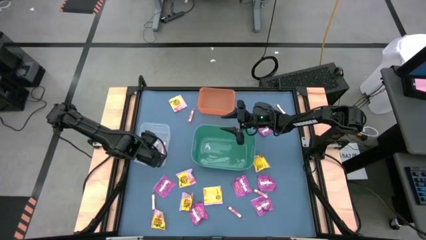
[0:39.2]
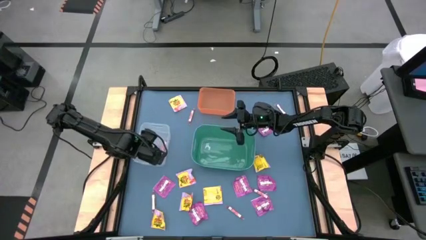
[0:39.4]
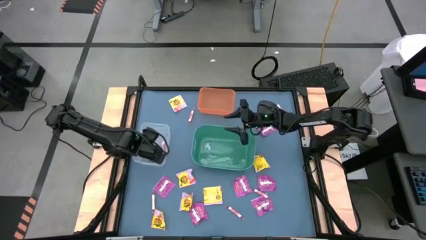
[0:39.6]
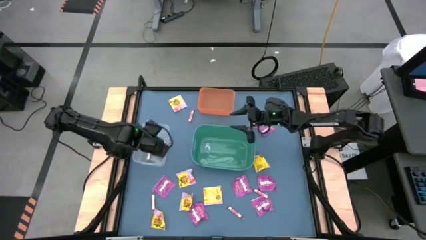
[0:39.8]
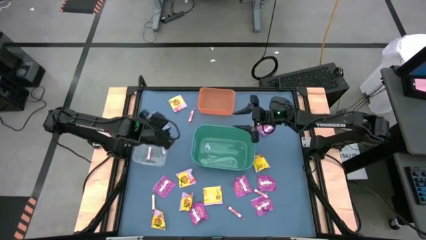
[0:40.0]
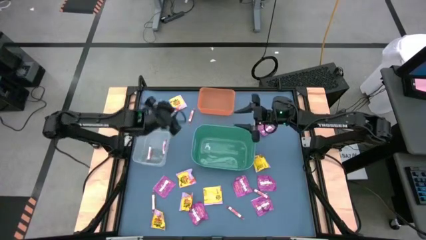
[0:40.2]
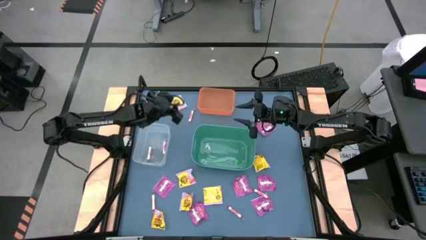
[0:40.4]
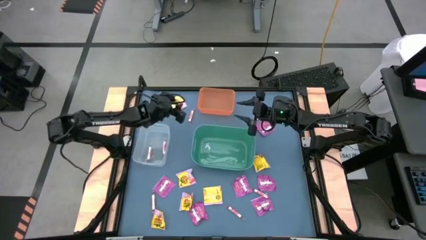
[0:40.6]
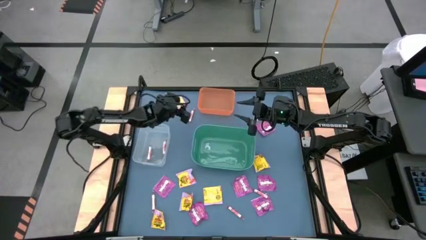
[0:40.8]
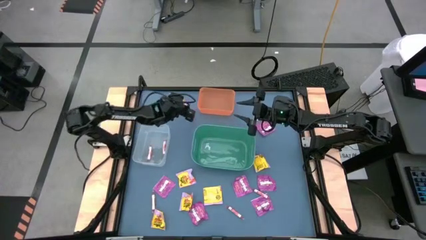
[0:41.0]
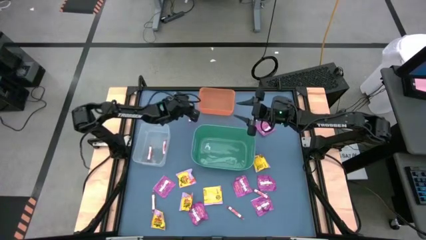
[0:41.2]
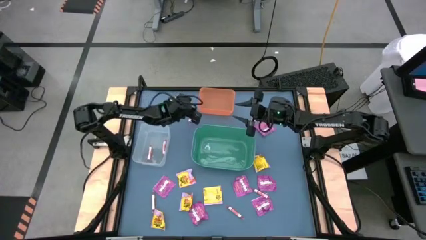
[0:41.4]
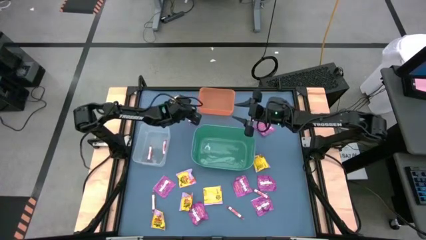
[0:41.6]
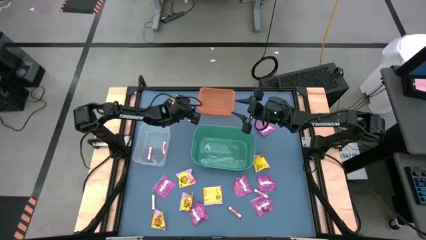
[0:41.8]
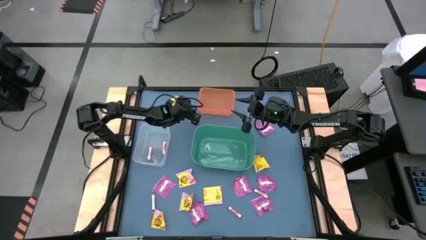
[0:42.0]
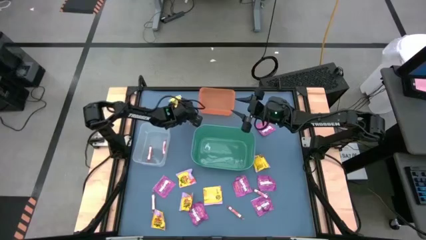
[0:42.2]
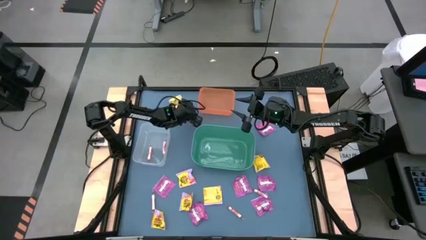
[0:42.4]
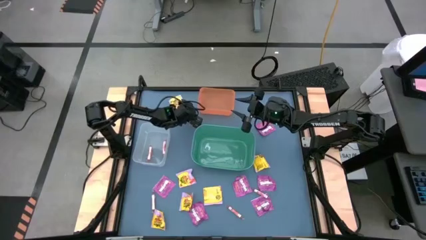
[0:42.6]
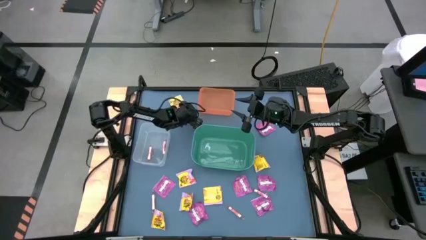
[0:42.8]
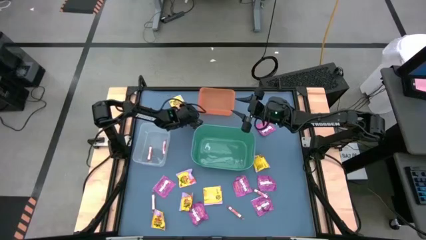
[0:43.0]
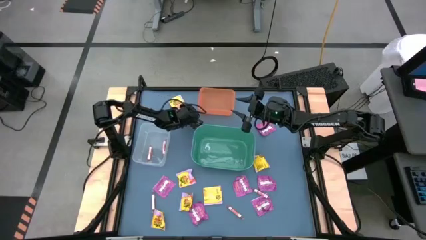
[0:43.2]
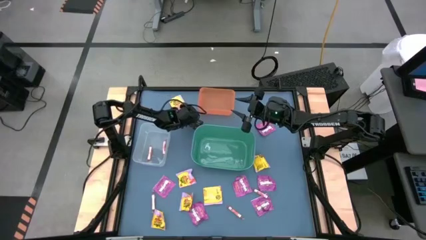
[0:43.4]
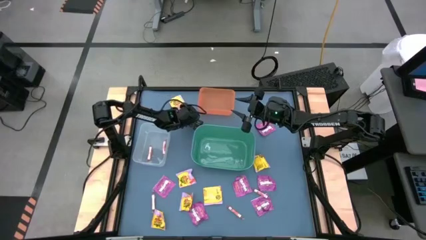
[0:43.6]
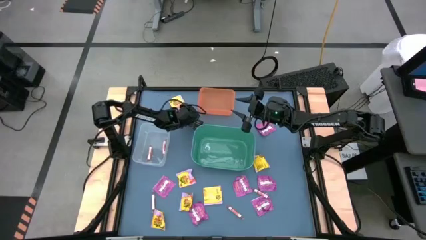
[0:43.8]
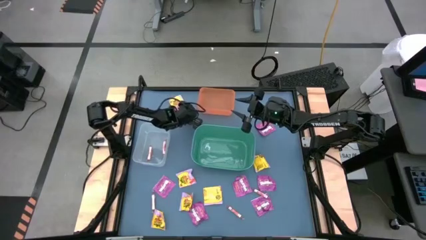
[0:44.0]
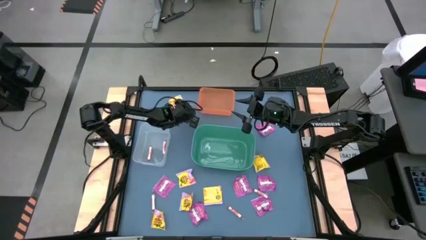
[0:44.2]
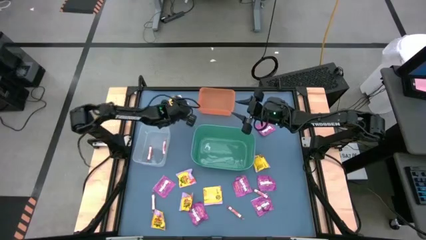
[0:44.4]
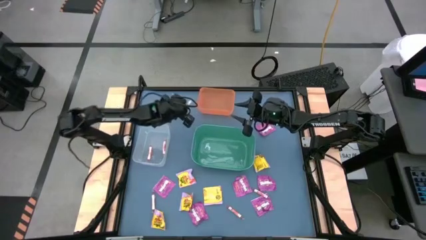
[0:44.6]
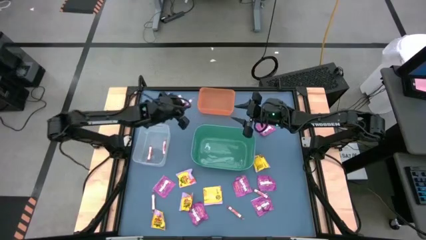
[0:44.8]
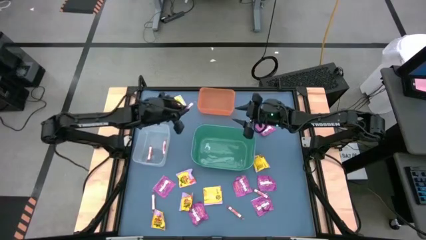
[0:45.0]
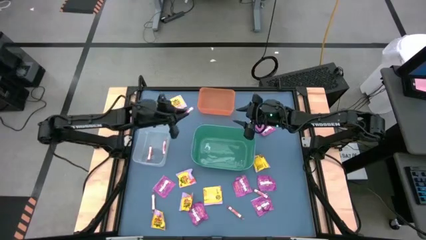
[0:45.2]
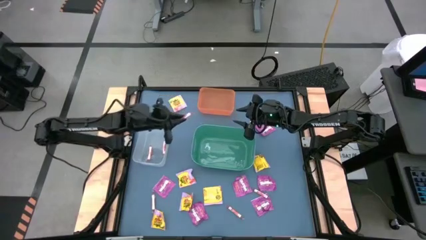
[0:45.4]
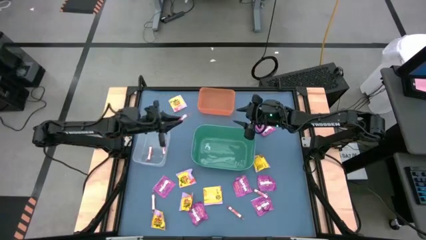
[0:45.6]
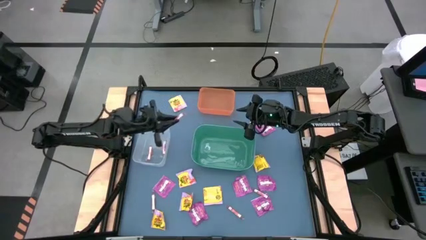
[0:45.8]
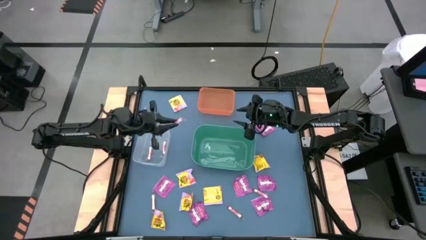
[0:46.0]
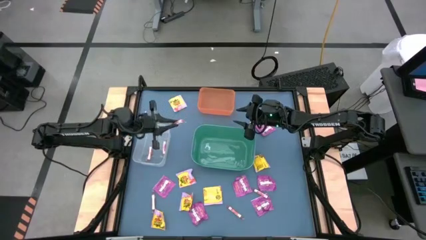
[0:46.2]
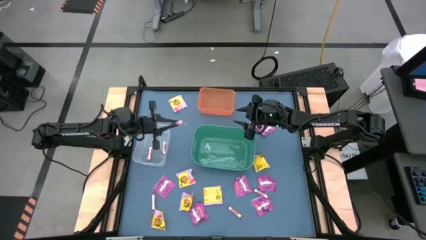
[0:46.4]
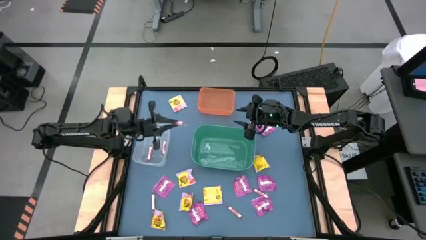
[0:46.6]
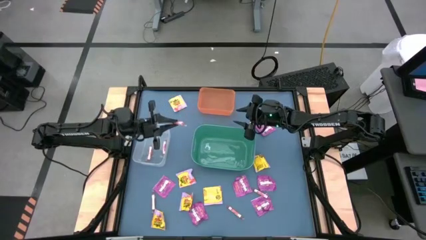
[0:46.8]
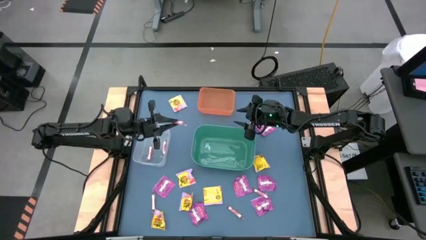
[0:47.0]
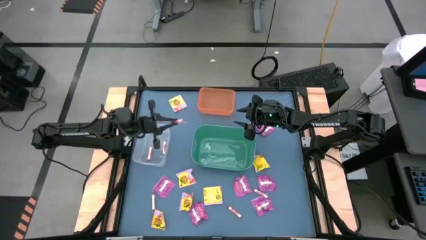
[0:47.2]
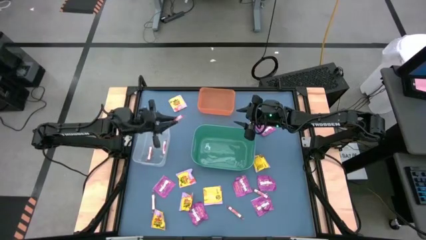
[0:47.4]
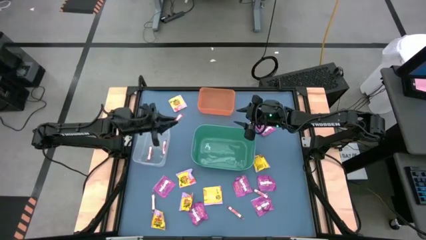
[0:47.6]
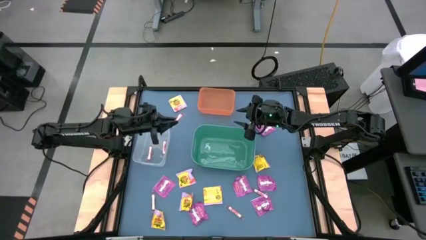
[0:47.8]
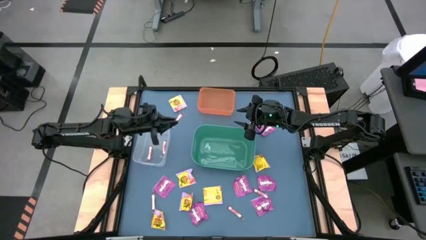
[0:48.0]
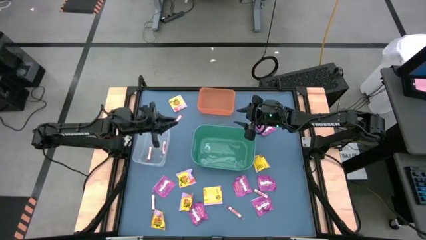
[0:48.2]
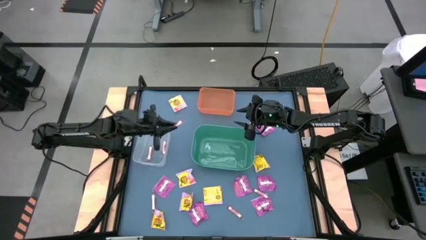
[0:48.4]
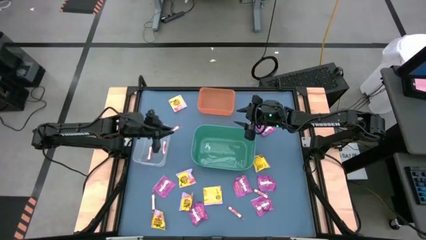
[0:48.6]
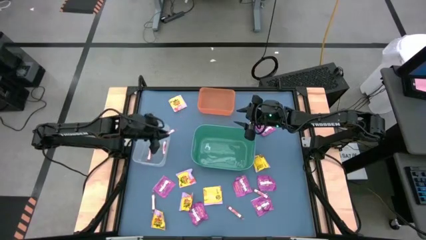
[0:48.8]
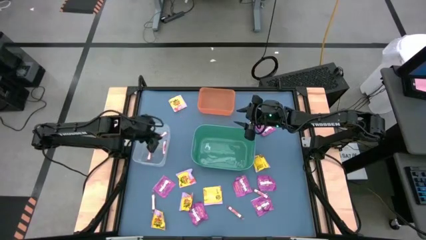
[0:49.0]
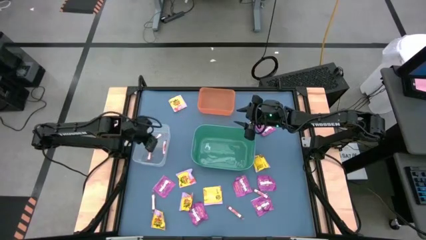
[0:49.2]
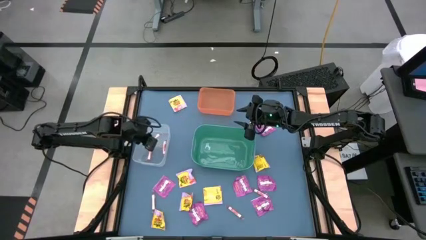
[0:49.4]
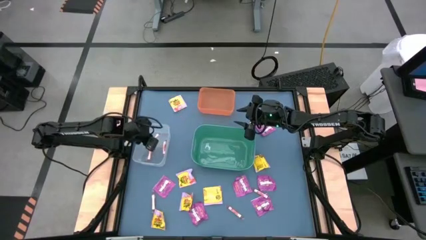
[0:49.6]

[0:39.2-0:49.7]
Task: Sort candy
Put the orange candy into the transparent bin

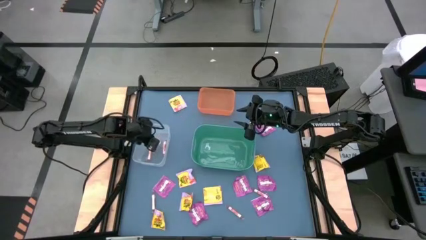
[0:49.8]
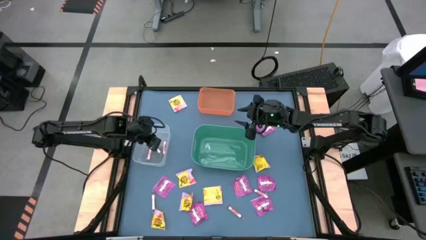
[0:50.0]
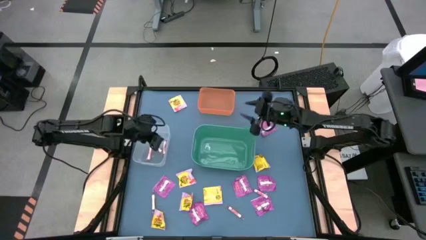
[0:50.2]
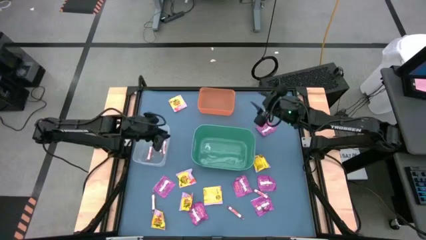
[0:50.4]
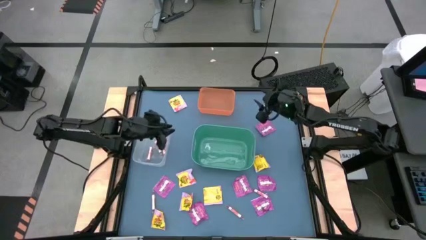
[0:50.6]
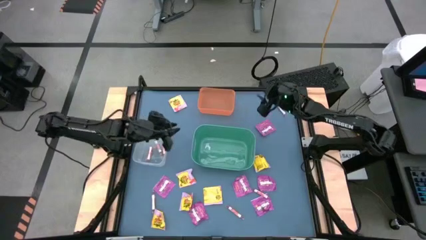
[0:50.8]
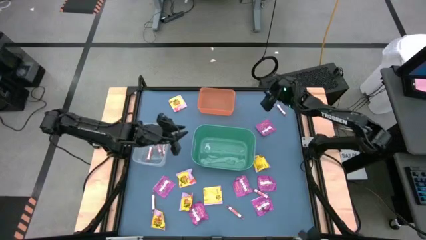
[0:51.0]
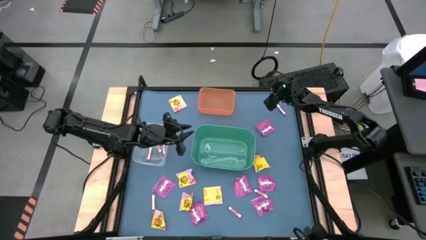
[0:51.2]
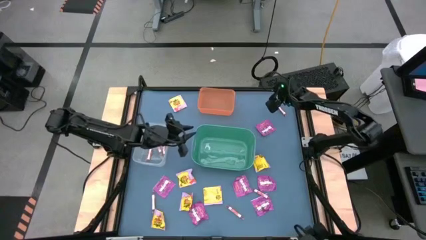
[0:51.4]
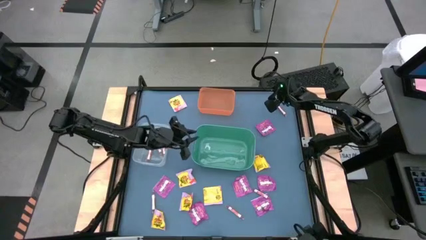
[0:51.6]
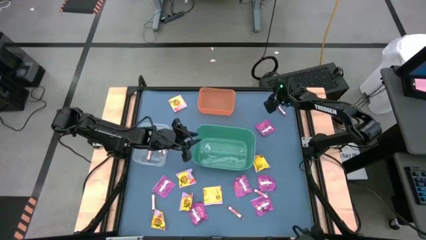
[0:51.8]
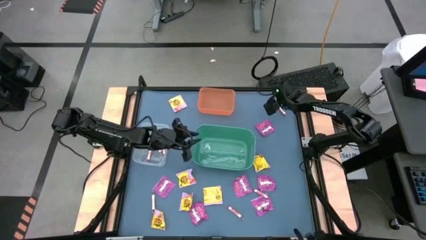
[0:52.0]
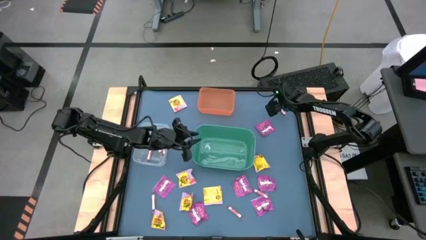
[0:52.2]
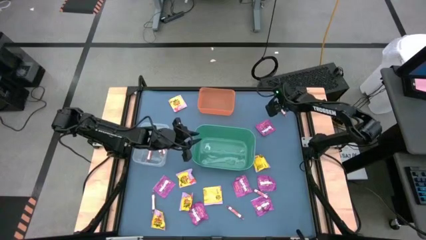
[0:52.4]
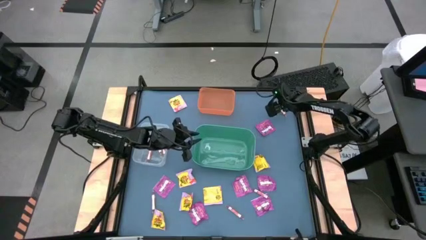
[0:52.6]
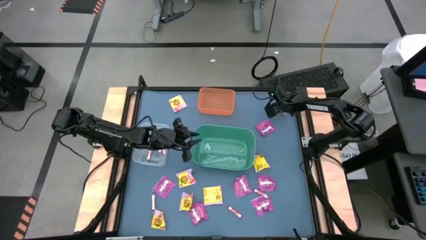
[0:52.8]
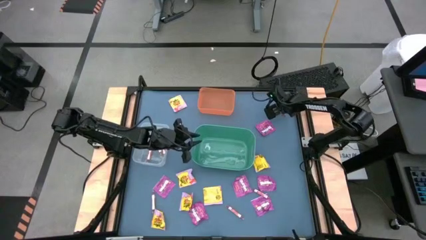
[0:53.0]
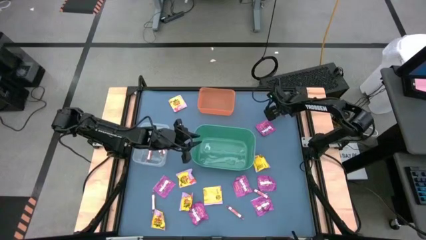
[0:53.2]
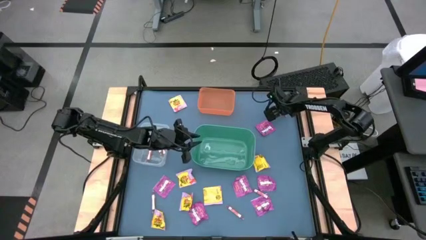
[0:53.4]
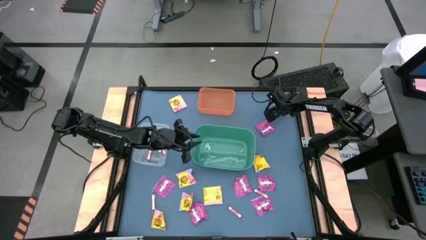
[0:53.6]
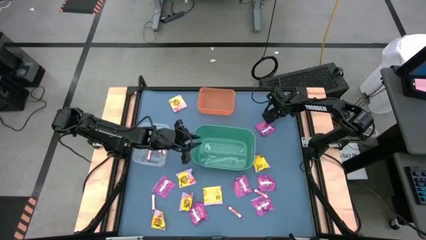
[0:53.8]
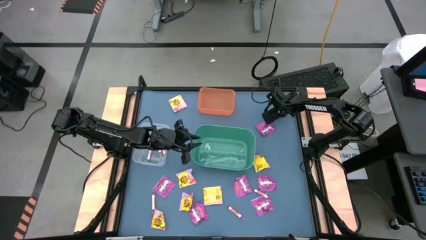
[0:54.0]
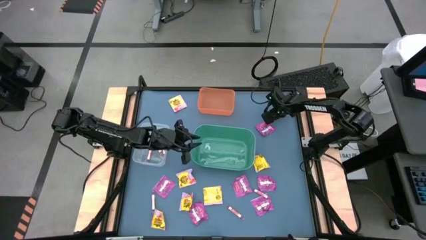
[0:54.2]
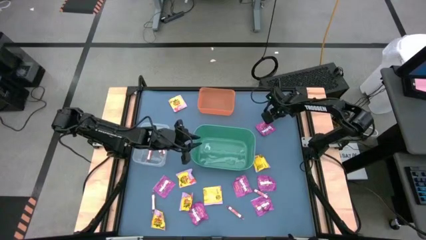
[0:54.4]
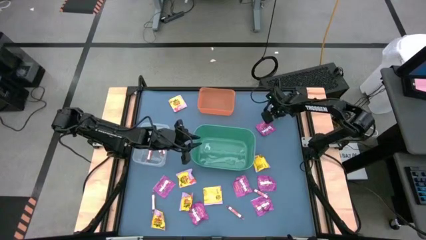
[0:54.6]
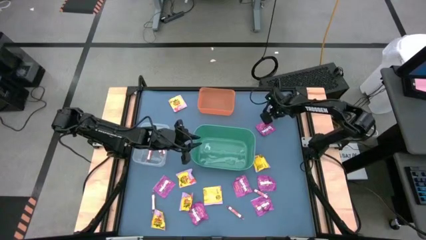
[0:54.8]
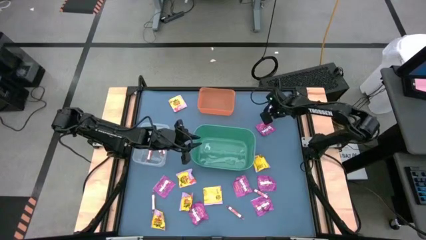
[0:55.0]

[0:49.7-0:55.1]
Put the orange candy into the transparent bin
